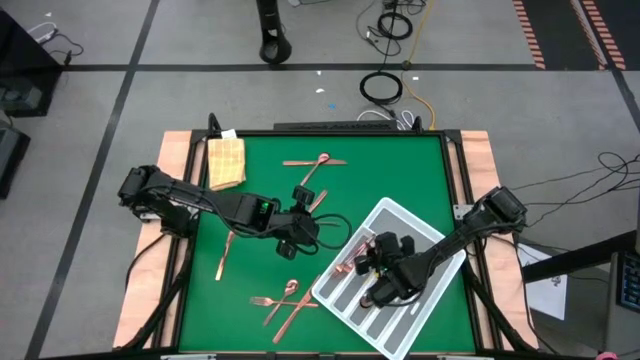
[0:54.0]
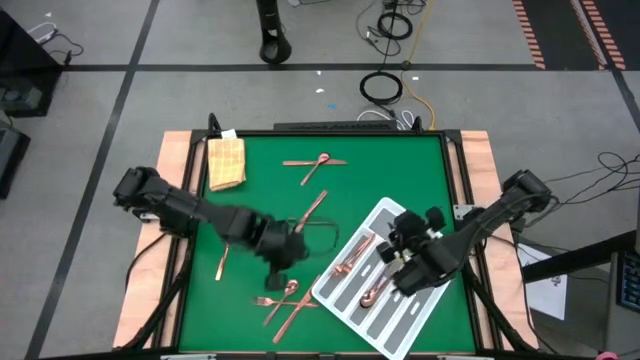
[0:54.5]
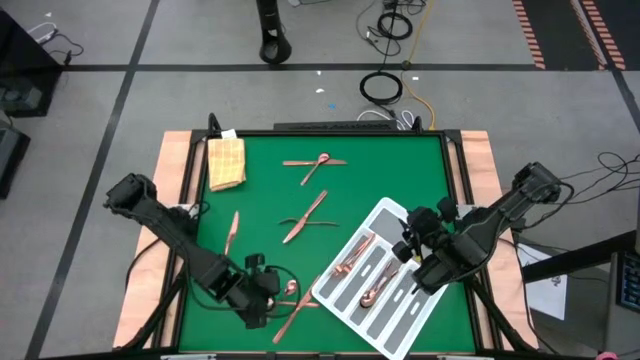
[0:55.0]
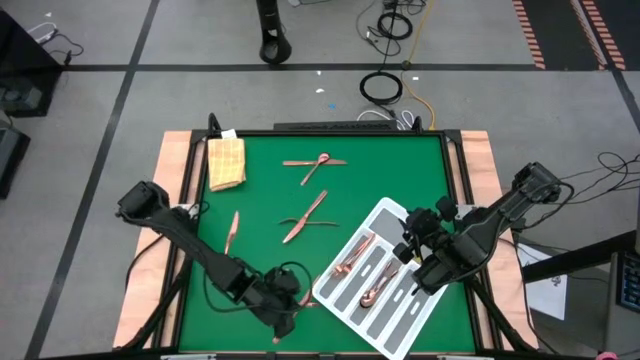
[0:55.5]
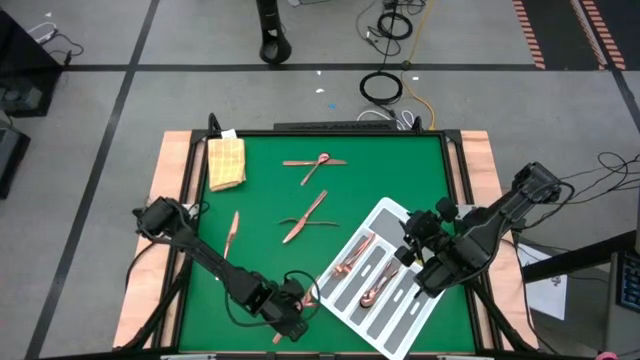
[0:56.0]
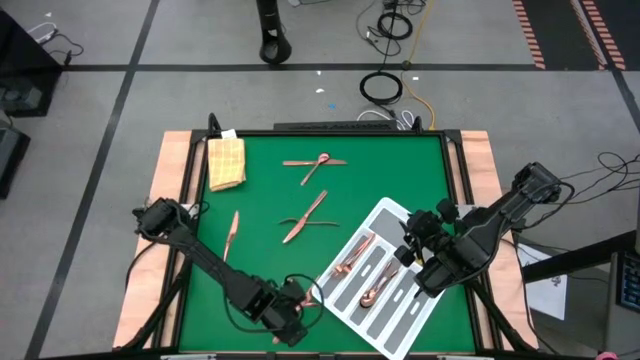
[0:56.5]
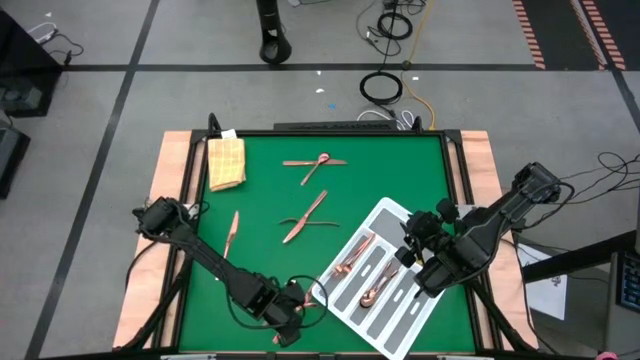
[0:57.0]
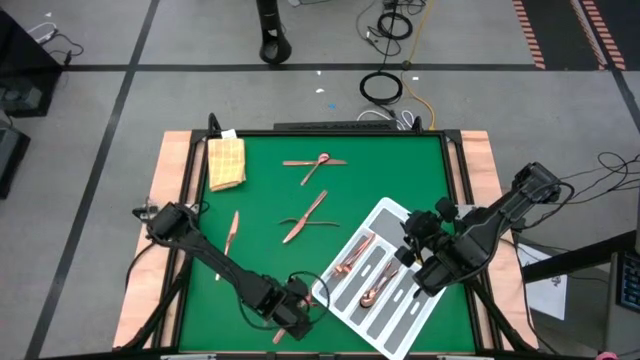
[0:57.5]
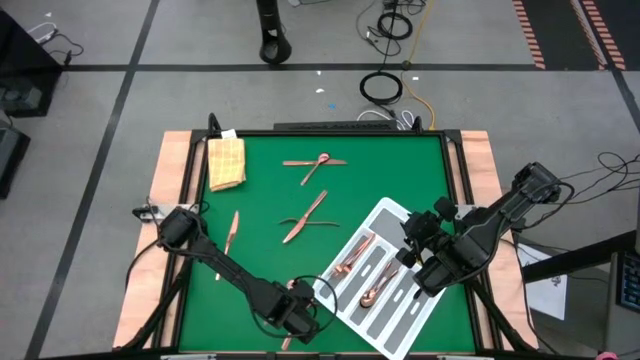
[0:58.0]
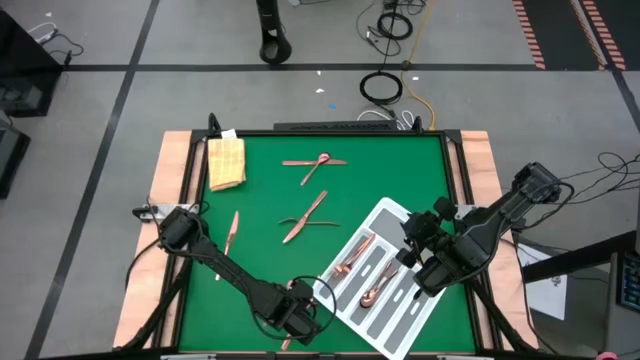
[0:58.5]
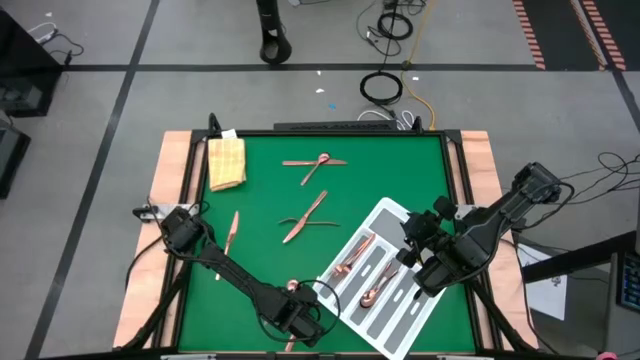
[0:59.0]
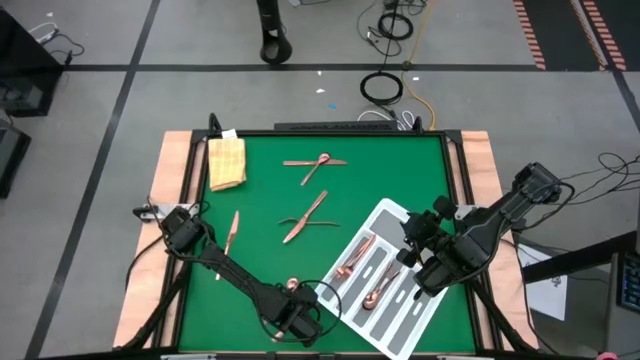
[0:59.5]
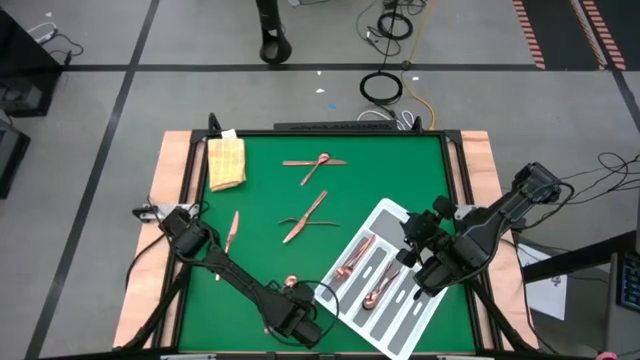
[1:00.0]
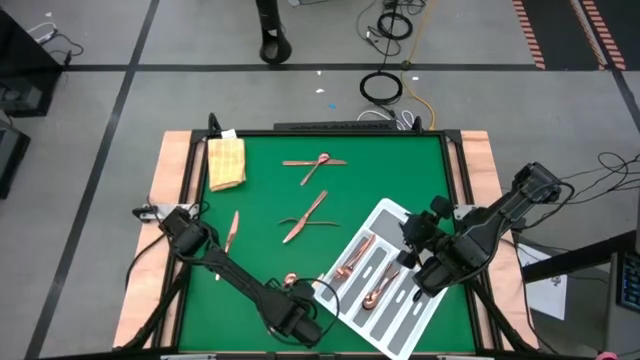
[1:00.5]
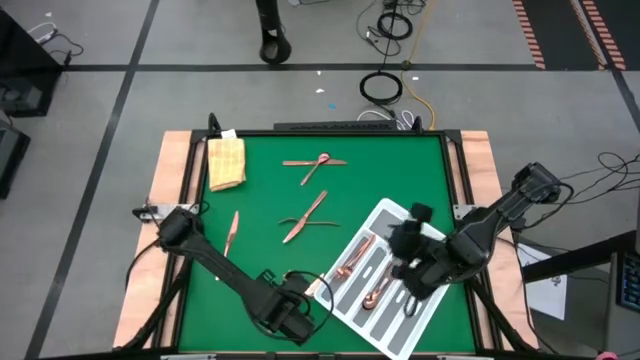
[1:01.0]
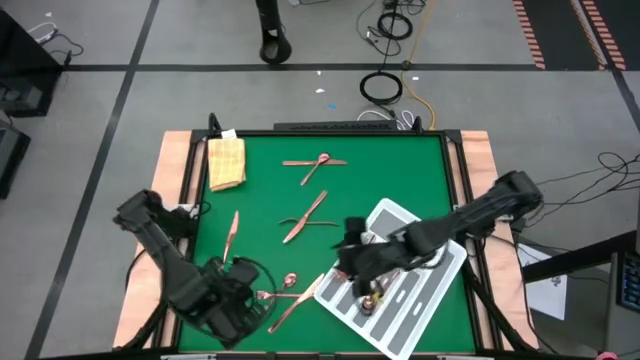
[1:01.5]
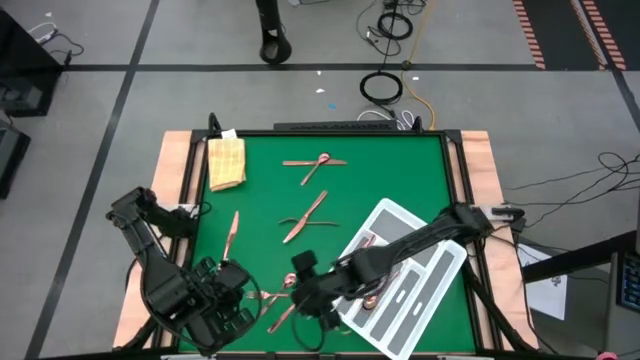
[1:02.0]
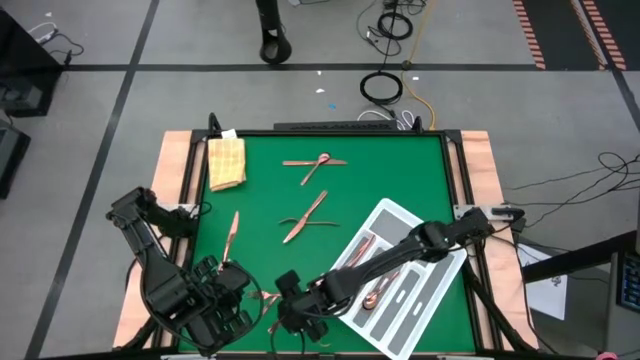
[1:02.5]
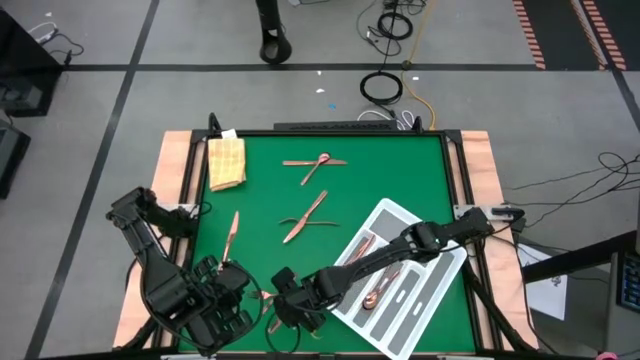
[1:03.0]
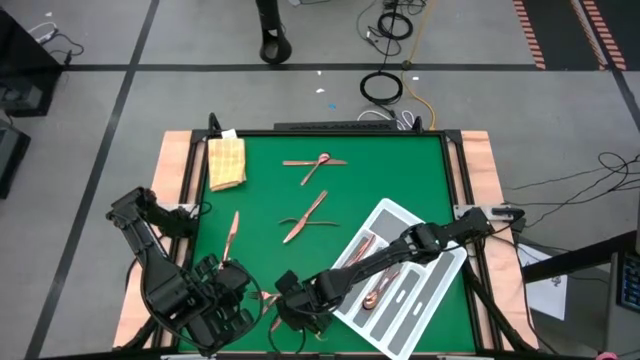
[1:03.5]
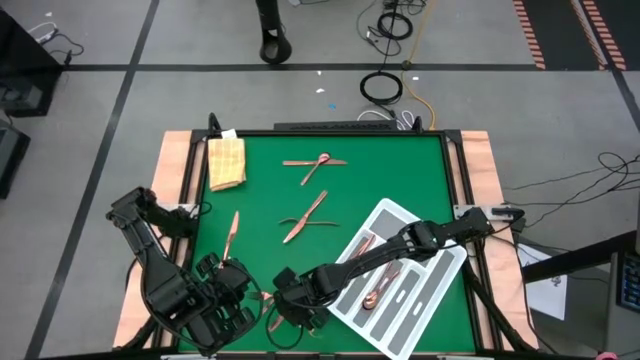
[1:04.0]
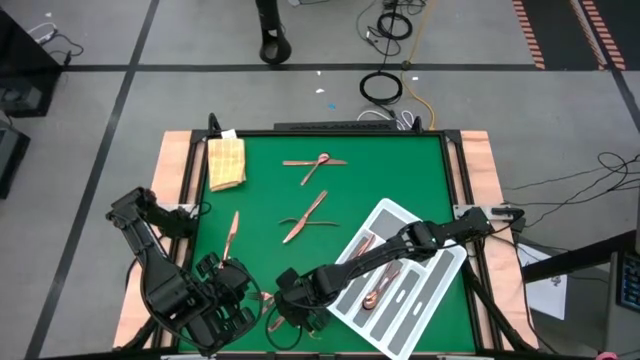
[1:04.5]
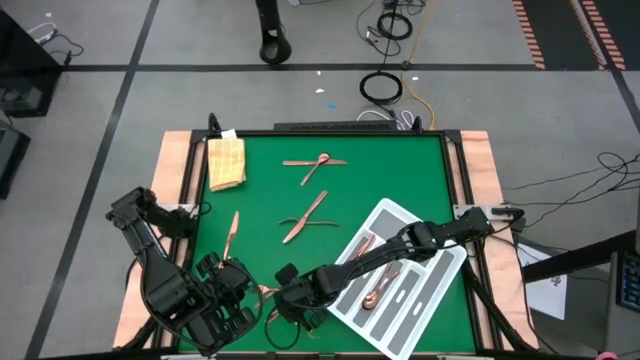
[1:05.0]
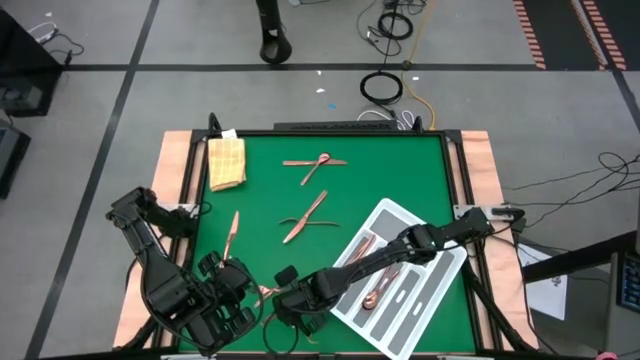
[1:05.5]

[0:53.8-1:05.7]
Task: Sort silverware
Put the bronze knife into the silverware tray

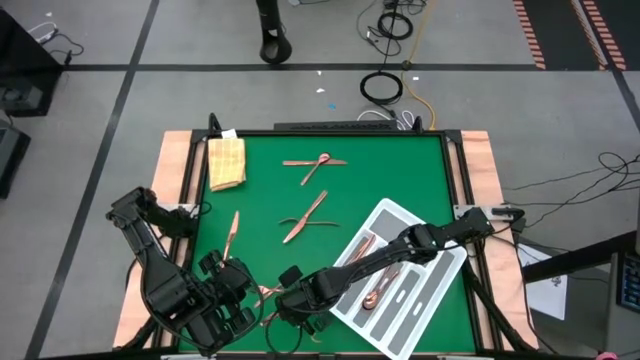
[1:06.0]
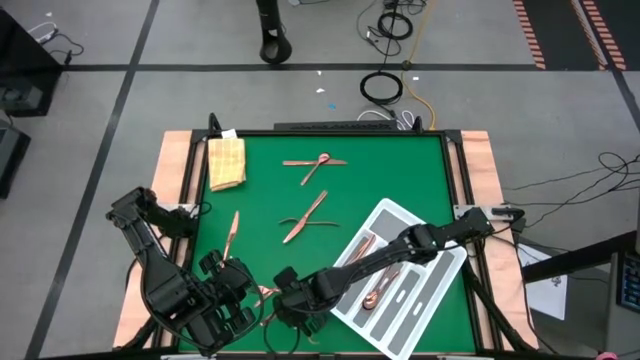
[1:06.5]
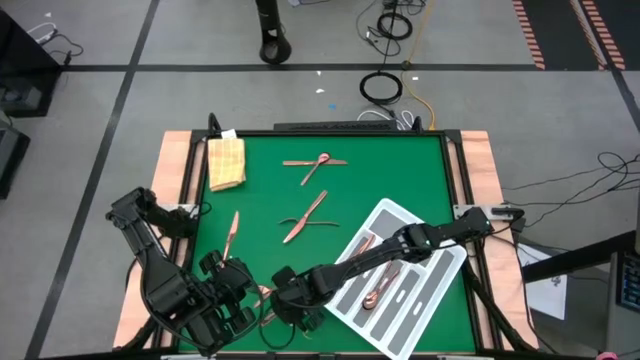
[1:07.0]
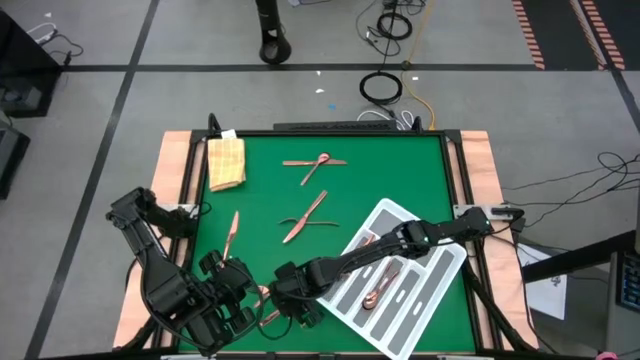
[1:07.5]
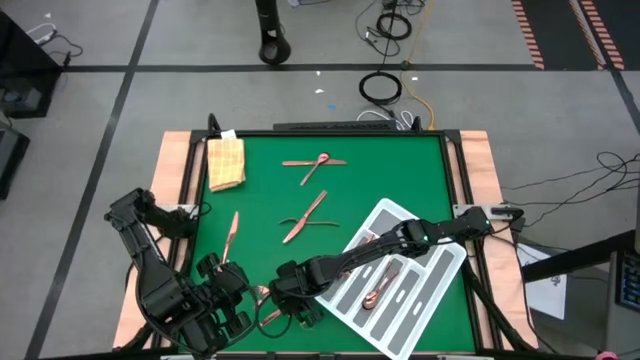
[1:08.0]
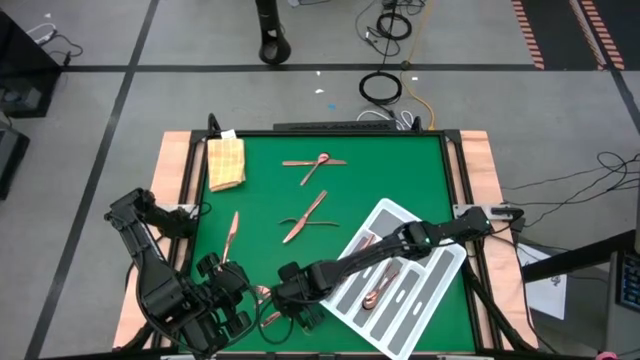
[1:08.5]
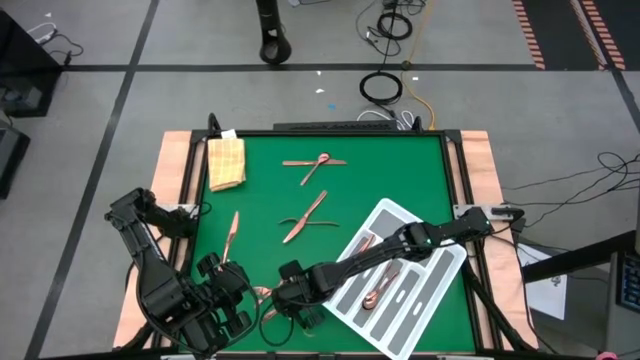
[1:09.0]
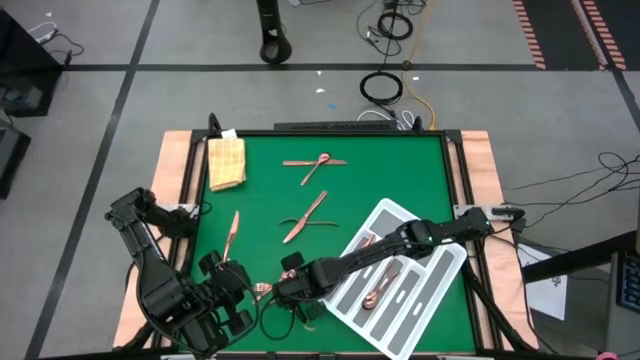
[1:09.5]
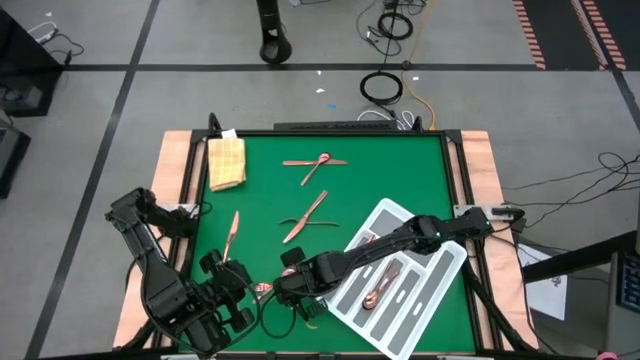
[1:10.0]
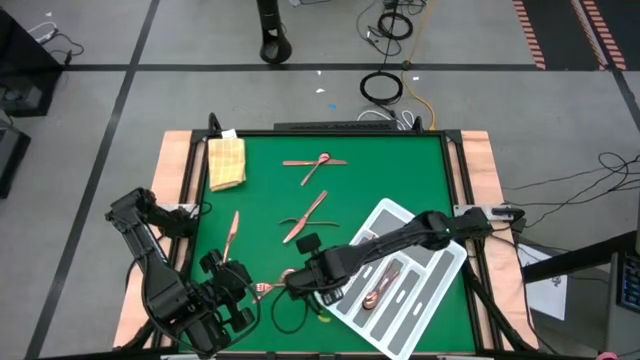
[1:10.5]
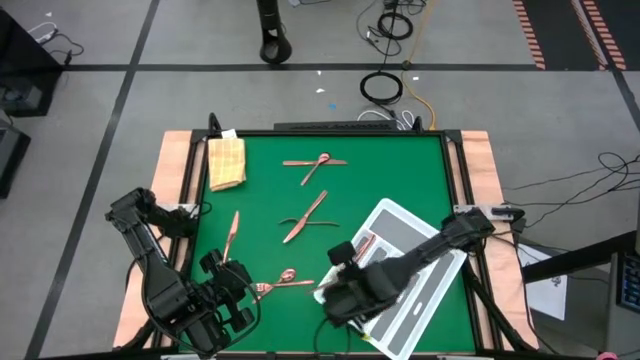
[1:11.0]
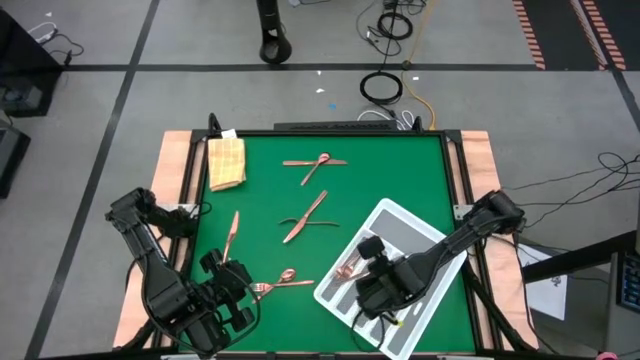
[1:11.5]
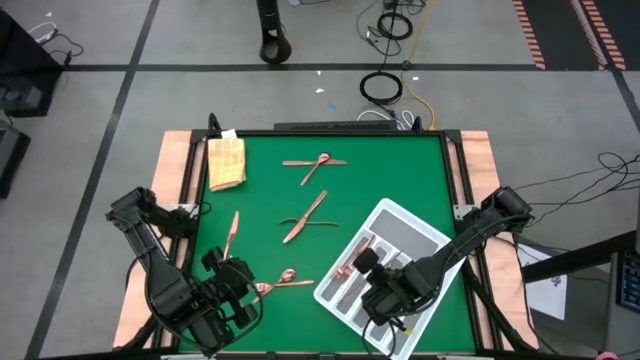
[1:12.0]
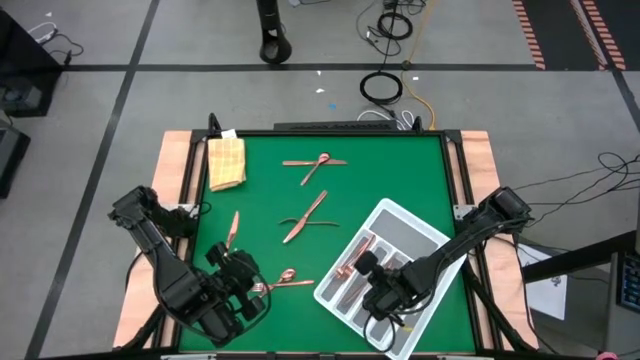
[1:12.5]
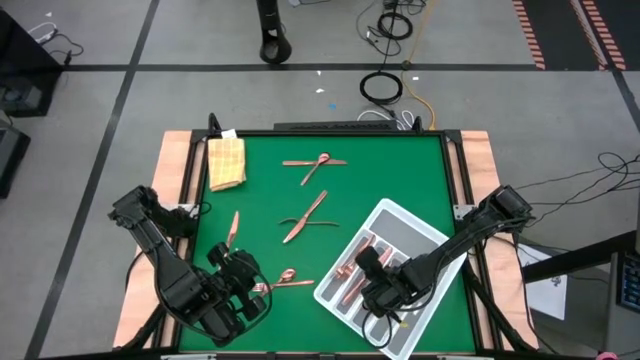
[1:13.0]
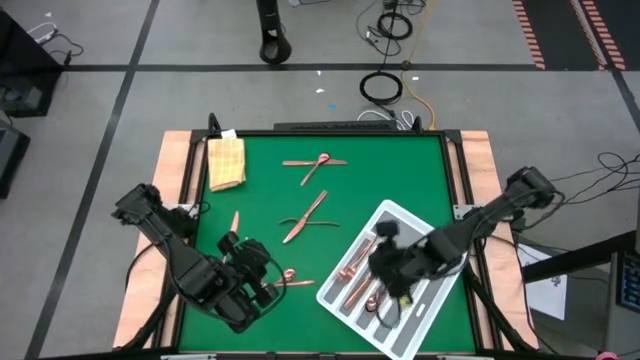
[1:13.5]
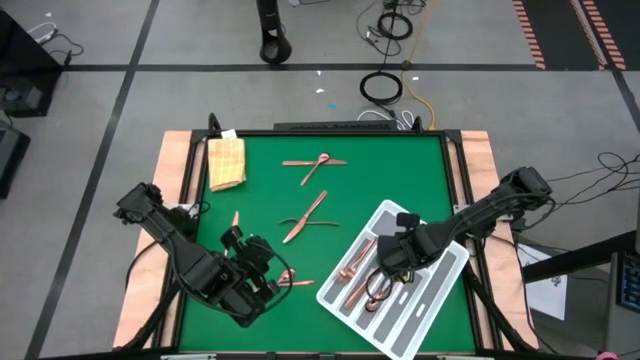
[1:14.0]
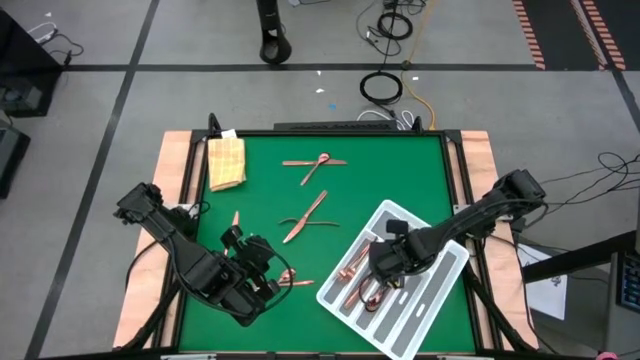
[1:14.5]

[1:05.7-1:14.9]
Put the bronze knife into the silverware tray

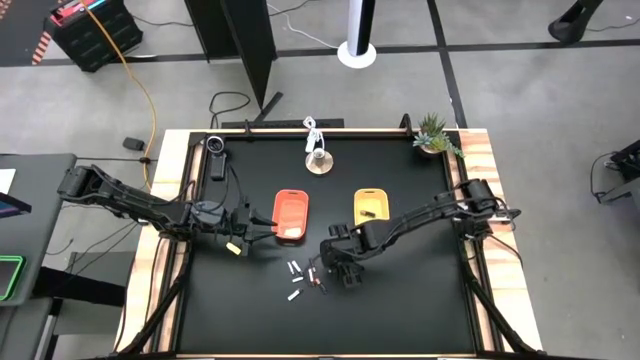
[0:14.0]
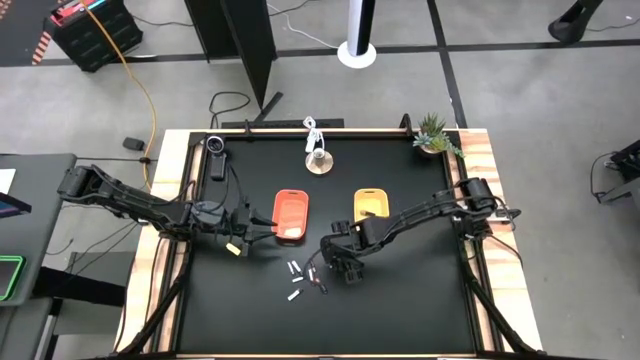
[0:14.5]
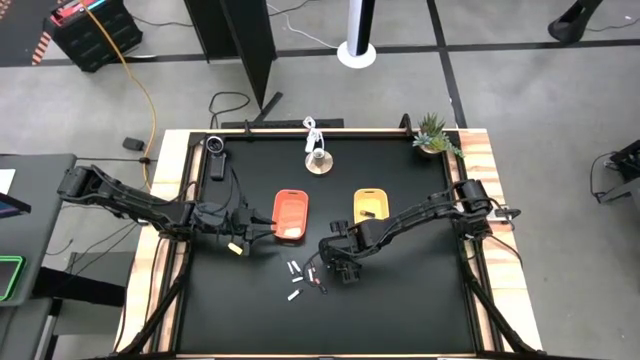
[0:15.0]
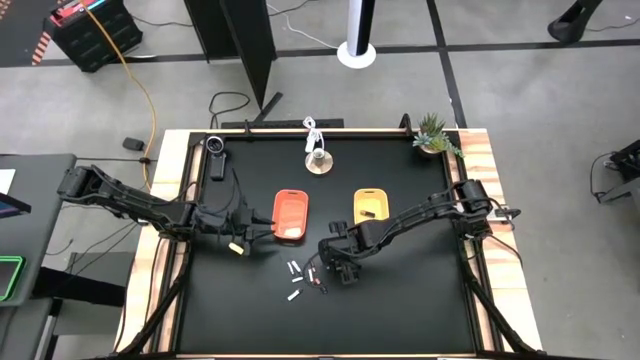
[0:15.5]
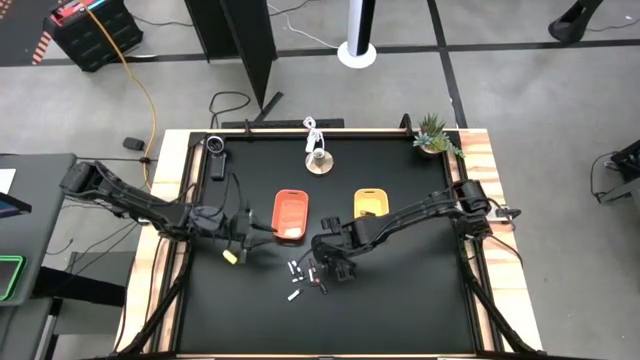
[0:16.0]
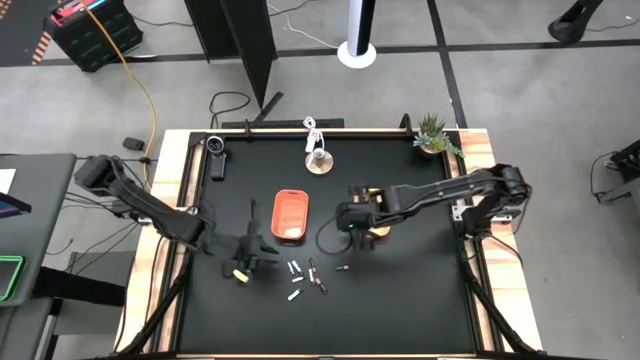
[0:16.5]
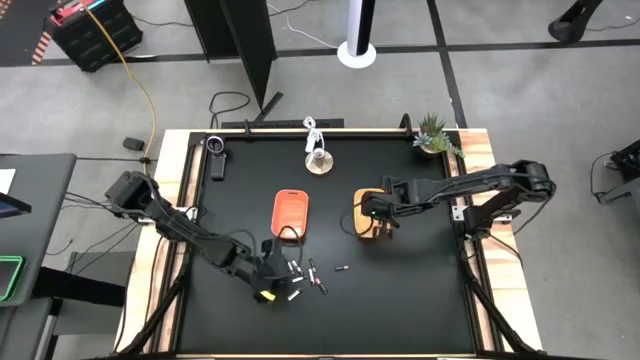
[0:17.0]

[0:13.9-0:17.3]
Task: Sort batteries
Put the black battery into the yellow bin
